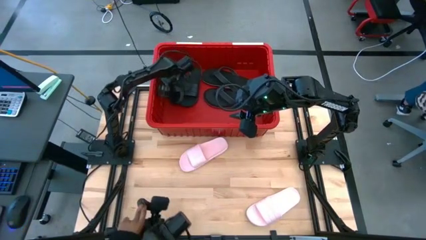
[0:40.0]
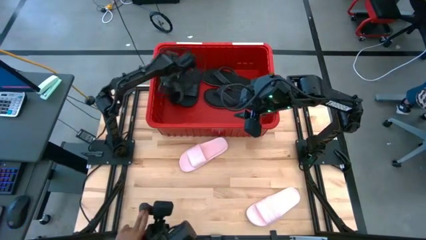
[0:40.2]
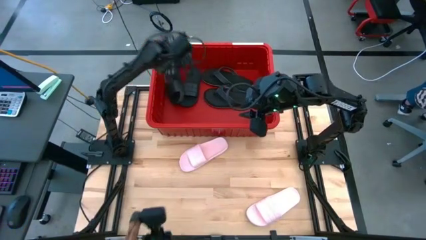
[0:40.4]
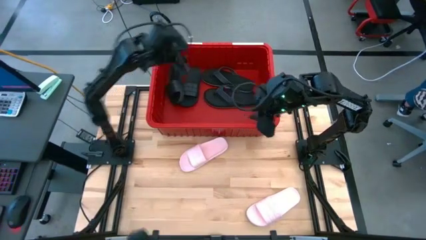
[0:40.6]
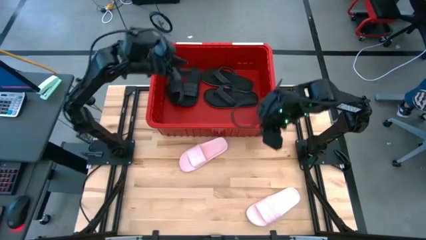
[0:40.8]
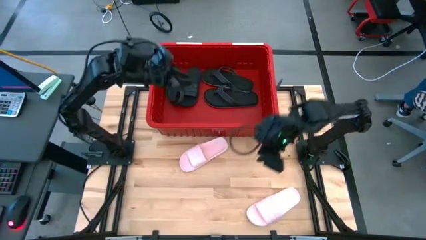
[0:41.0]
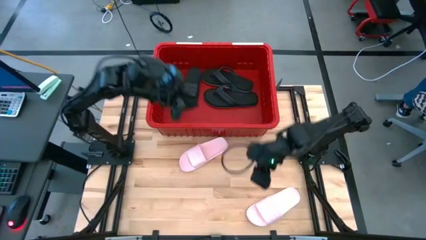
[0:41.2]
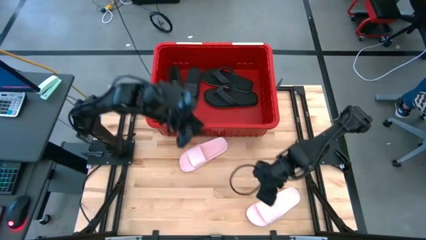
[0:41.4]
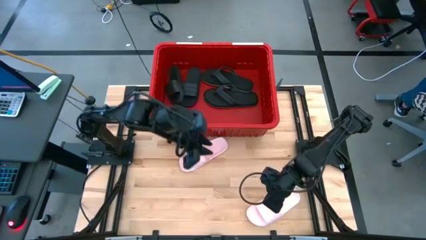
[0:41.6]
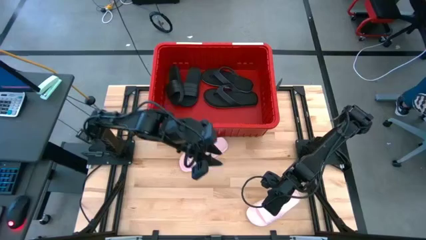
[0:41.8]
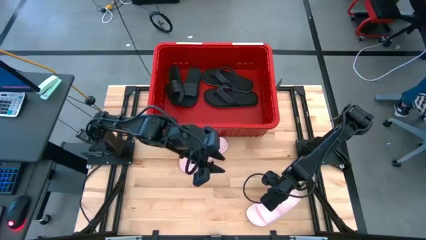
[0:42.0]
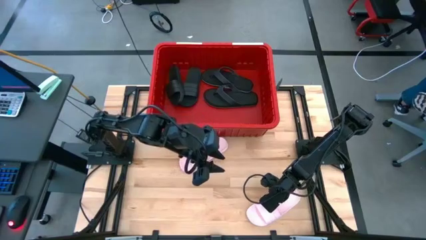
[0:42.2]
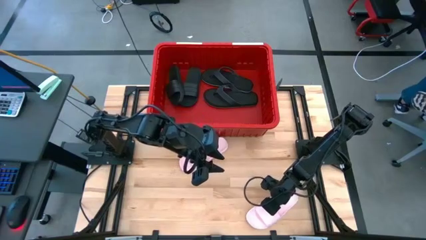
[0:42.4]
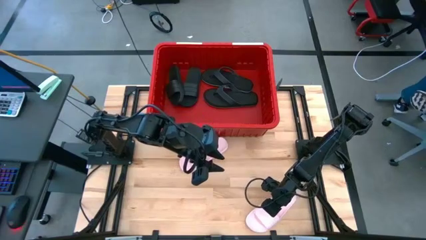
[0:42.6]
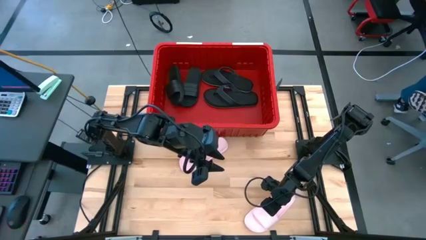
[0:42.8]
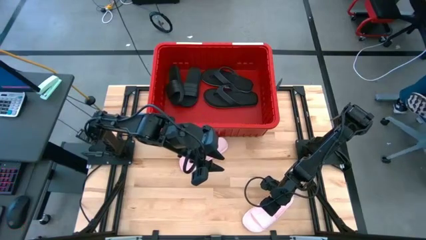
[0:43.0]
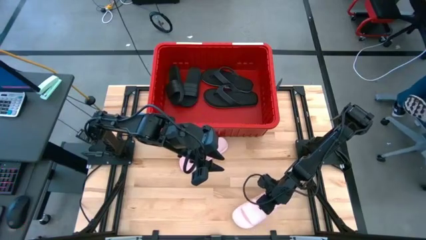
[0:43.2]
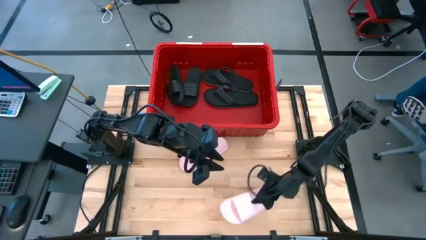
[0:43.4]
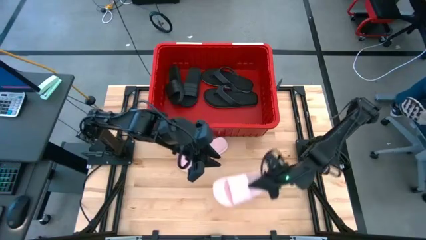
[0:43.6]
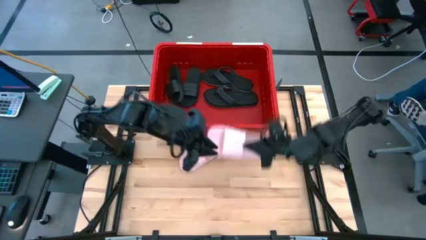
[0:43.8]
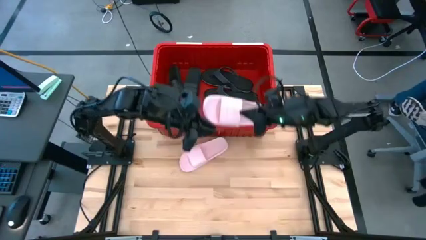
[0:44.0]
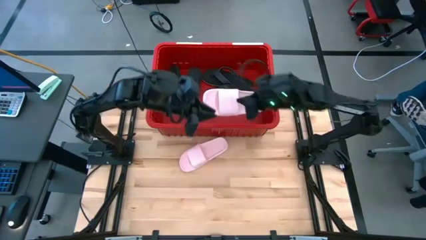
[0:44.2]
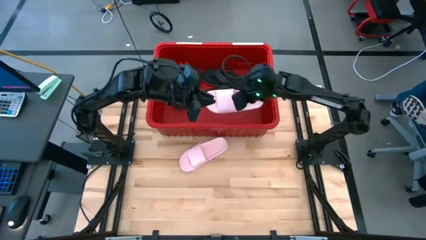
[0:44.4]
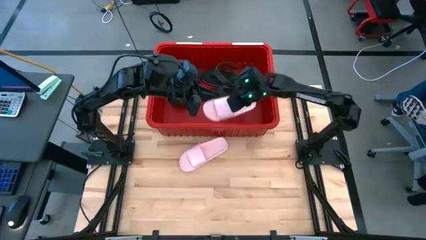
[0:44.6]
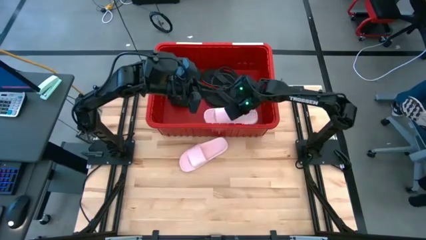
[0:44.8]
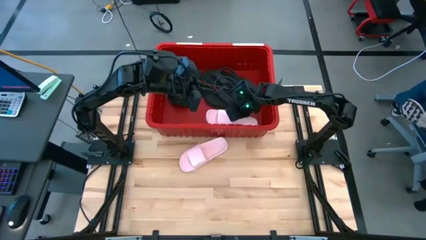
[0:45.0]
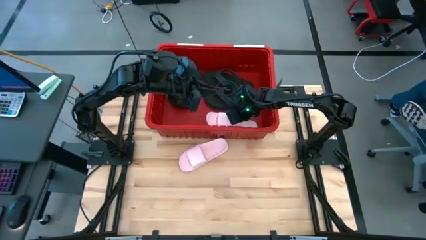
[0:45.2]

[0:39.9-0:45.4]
Task: Pick and place slides into bin
Put the bottom pink slide into the red bin

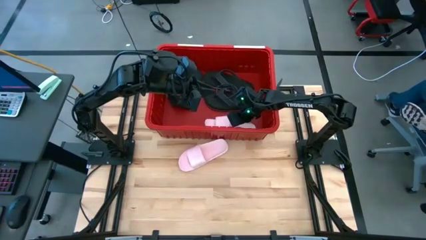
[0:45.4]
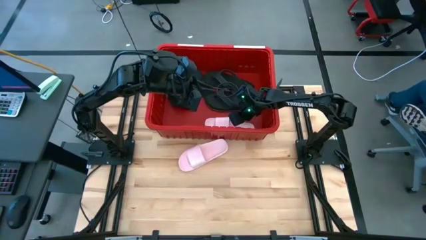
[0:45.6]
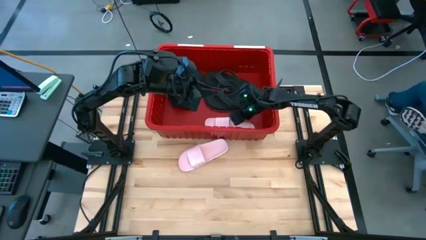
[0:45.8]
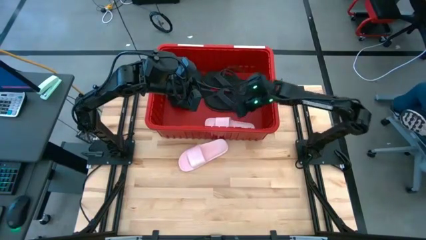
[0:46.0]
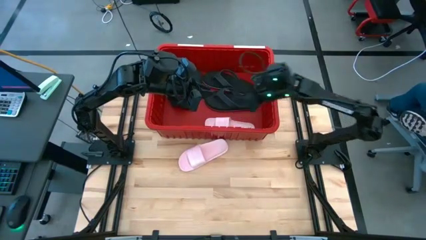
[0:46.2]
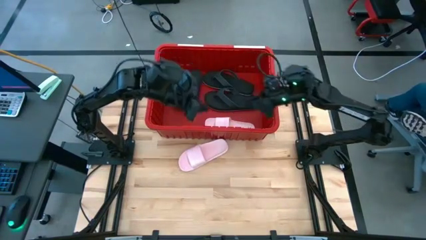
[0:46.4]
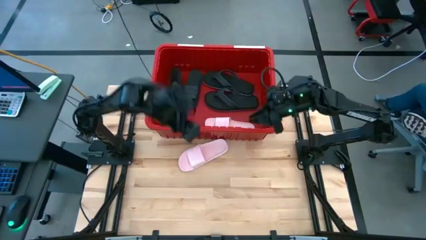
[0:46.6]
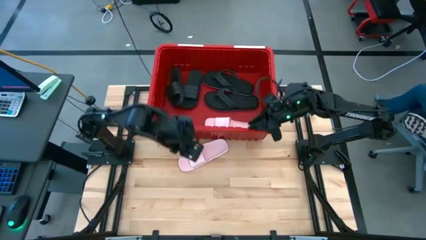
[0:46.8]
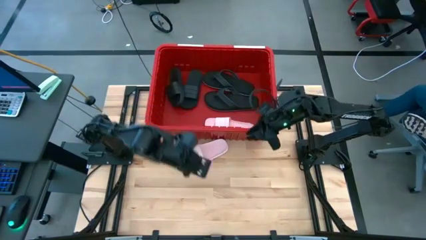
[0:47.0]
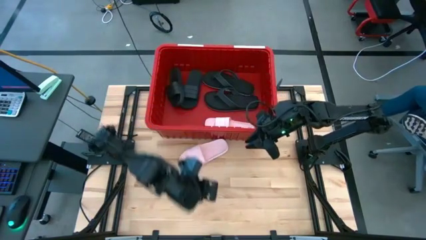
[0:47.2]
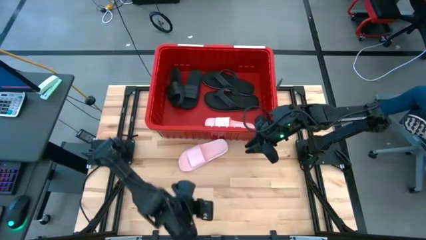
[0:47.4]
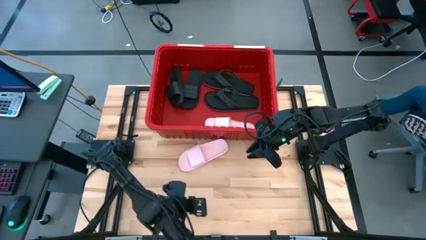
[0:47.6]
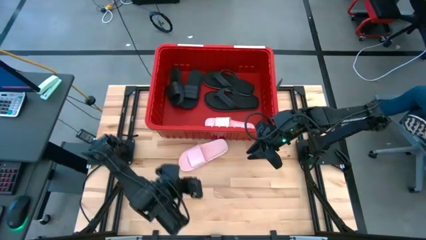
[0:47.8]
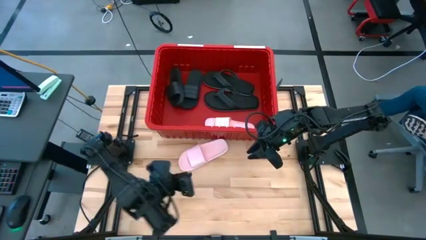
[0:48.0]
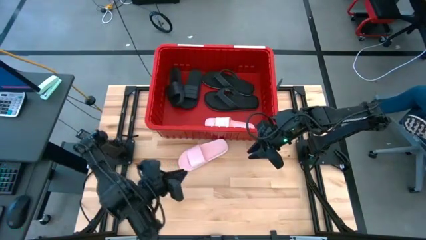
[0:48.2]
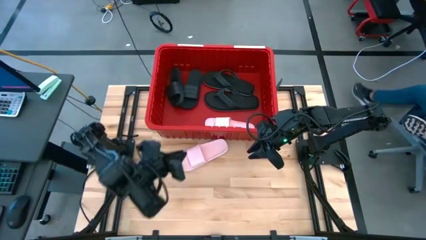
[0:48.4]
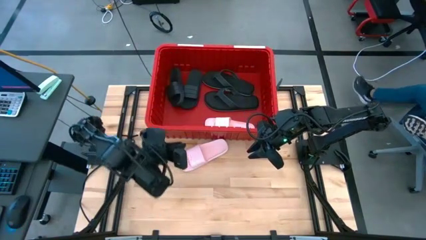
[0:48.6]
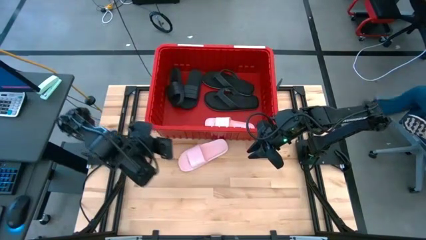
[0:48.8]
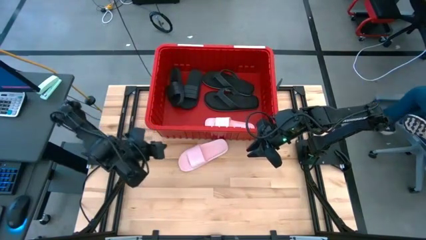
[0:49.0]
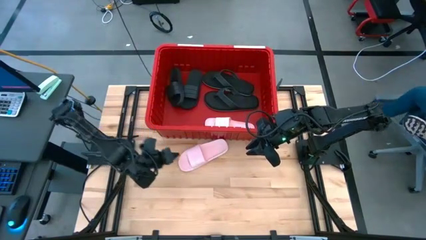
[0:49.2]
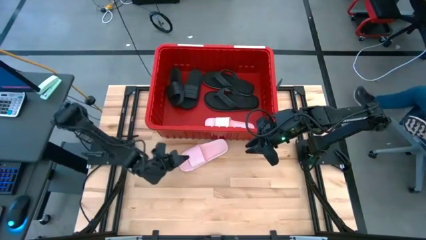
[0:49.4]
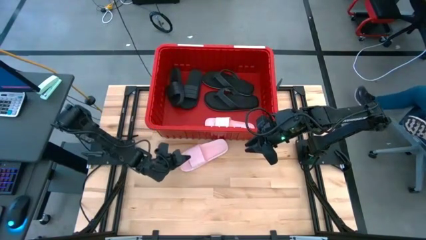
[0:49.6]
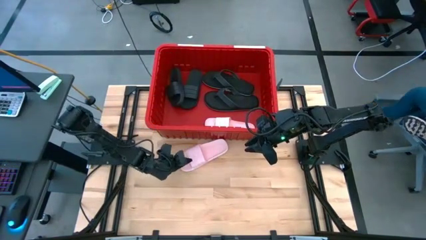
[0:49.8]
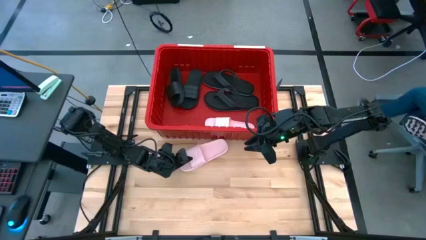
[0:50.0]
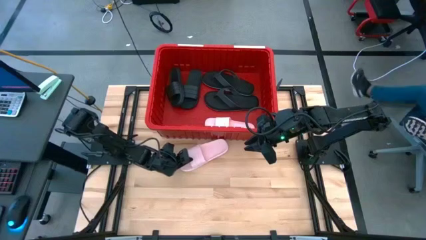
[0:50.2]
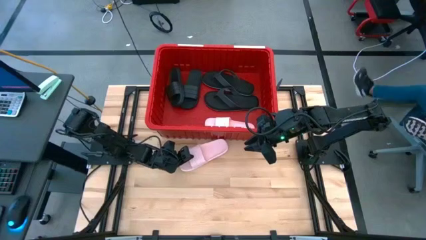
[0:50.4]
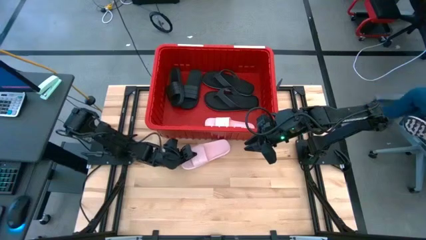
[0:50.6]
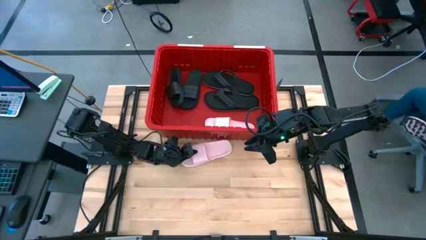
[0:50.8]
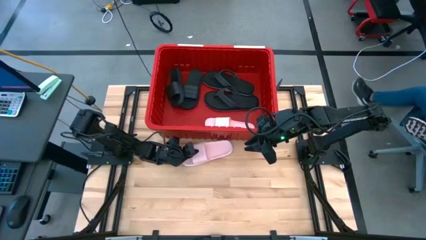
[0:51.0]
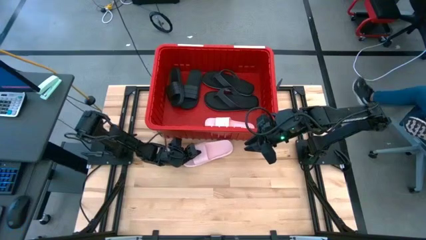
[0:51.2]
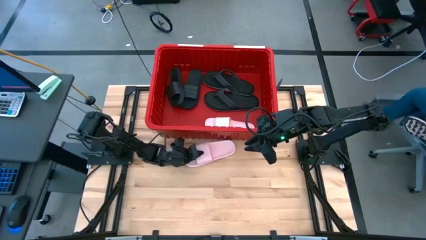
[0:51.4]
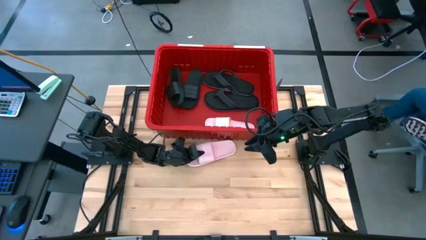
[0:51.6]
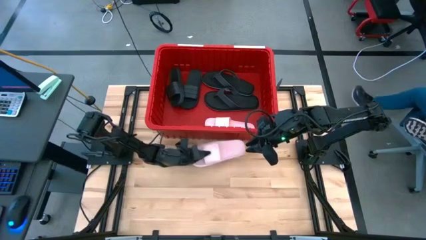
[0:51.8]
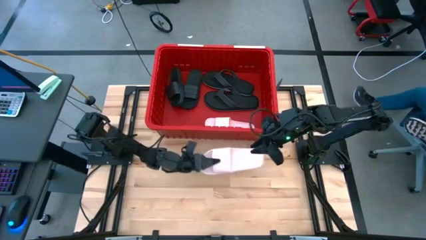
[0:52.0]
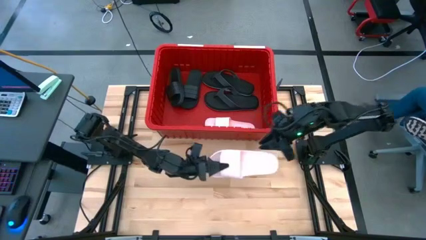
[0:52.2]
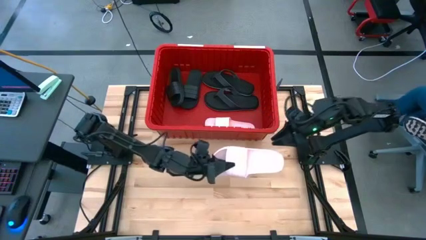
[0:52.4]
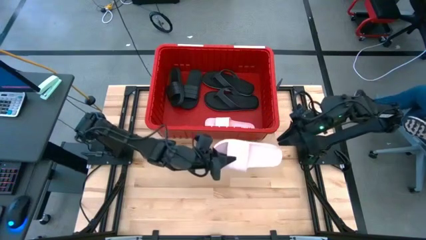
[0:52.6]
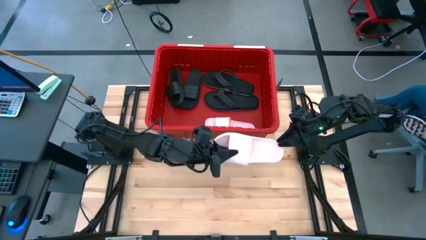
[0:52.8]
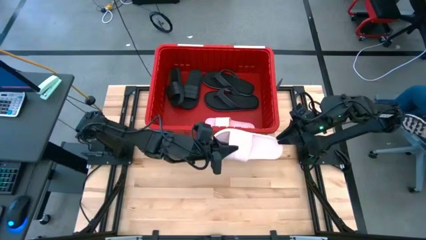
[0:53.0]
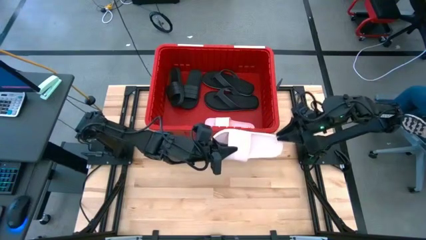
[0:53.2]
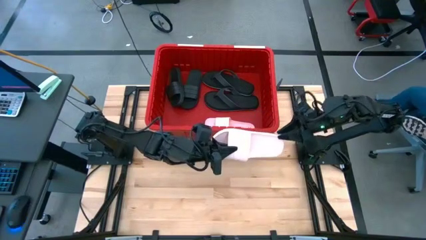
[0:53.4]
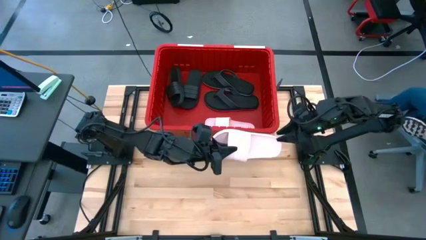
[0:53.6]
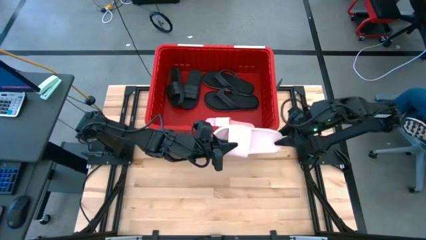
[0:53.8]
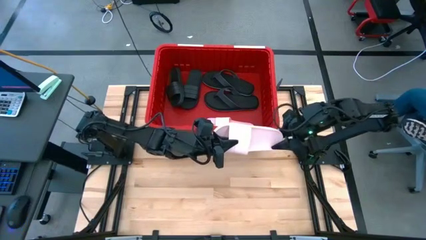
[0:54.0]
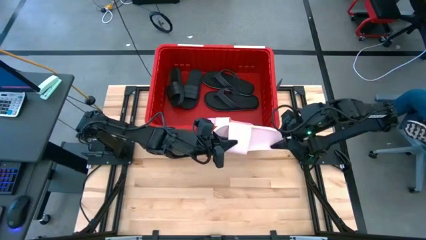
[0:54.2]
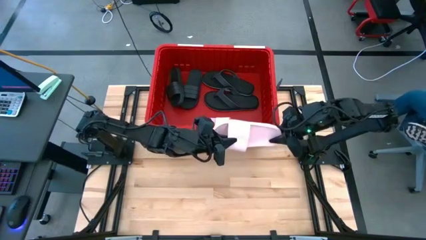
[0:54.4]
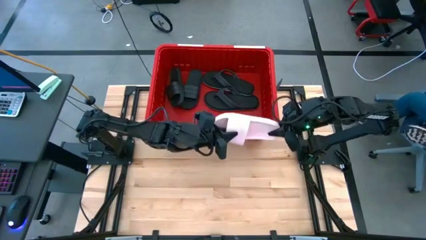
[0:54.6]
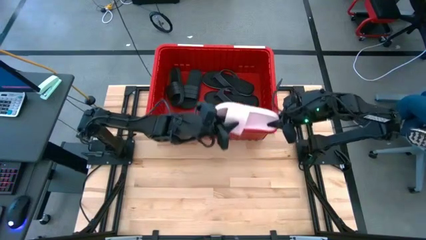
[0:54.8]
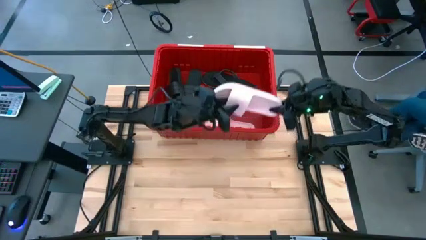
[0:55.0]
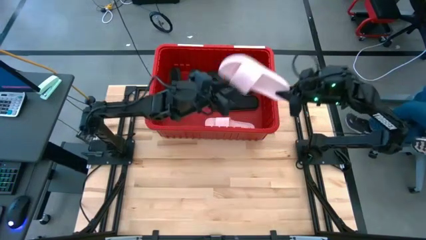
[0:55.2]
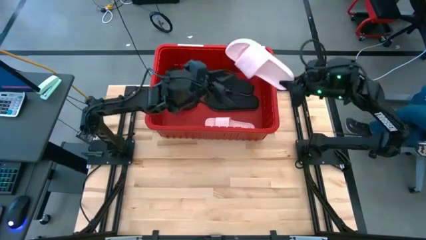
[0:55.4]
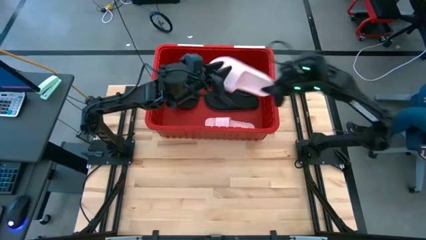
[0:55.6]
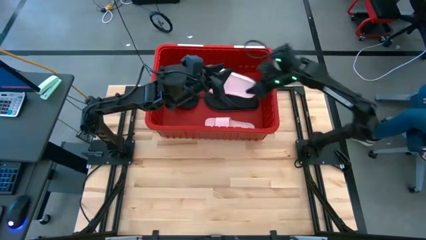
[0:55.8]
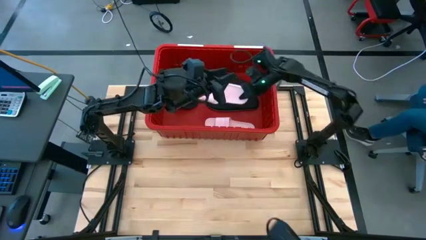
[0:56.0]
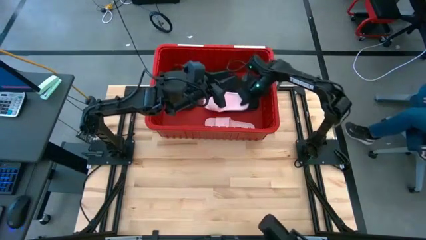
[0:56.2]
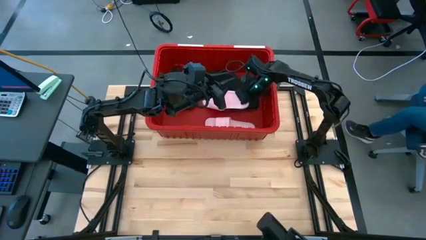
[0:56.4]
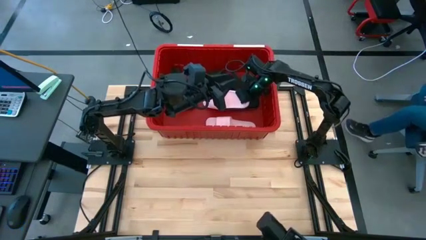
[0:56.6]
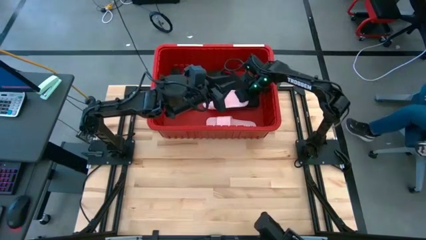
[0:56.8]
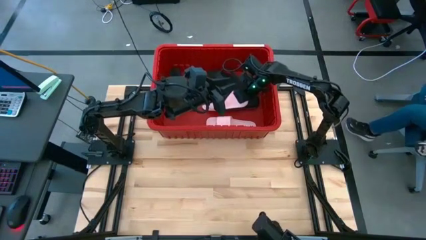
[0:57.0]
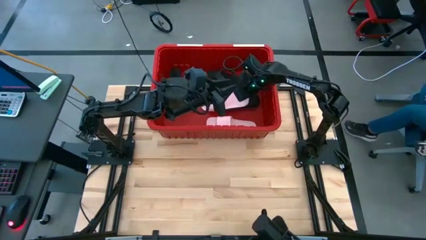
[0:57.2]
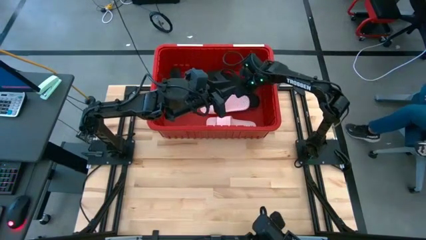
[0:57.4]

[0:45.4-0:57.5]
Put the pink slide into the red bin
